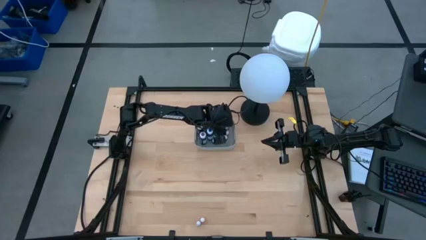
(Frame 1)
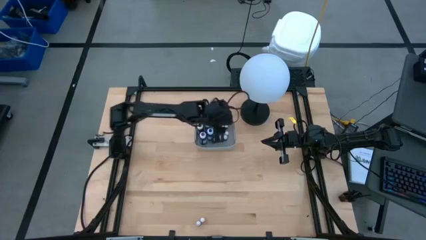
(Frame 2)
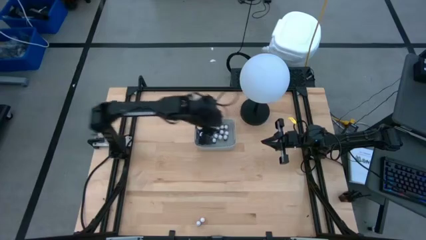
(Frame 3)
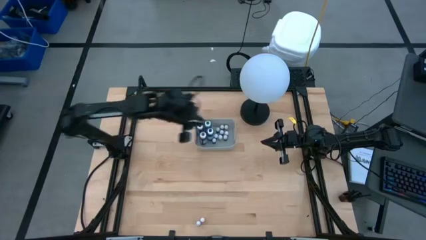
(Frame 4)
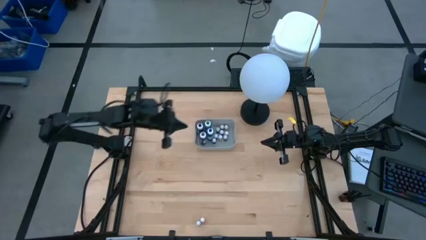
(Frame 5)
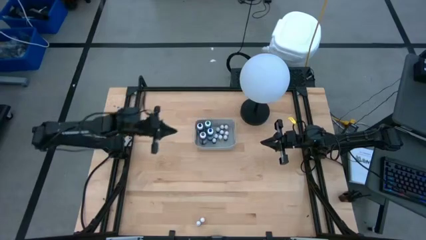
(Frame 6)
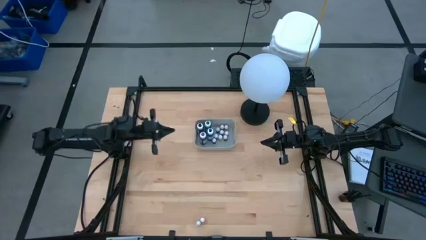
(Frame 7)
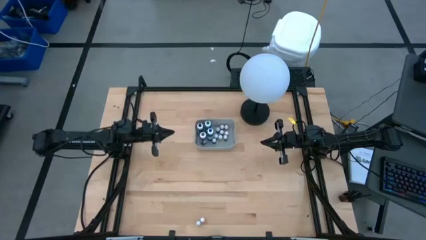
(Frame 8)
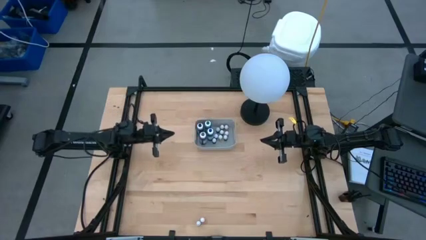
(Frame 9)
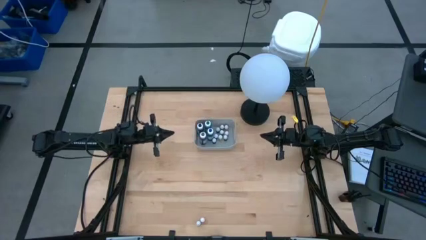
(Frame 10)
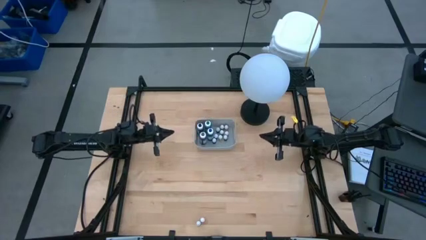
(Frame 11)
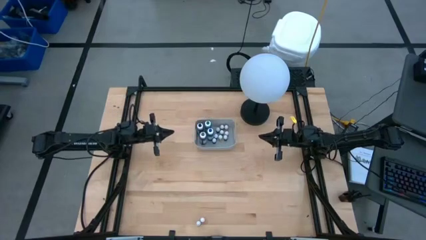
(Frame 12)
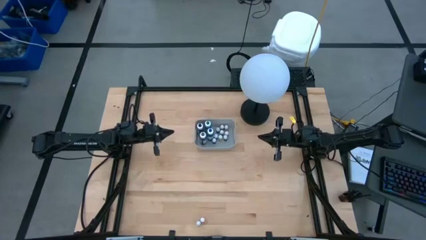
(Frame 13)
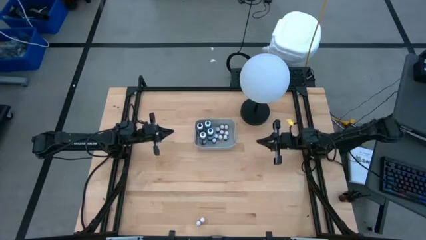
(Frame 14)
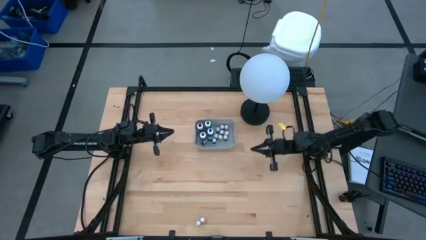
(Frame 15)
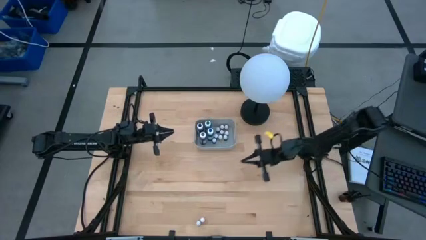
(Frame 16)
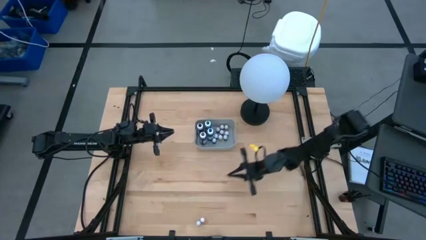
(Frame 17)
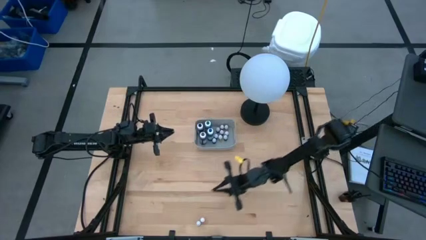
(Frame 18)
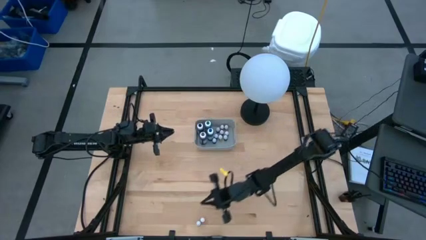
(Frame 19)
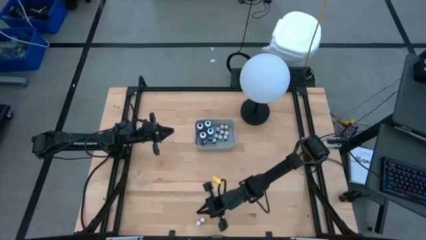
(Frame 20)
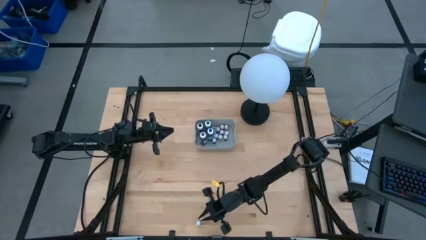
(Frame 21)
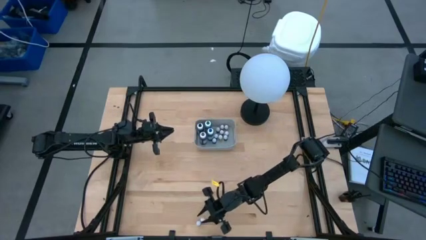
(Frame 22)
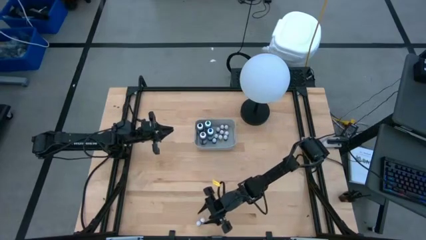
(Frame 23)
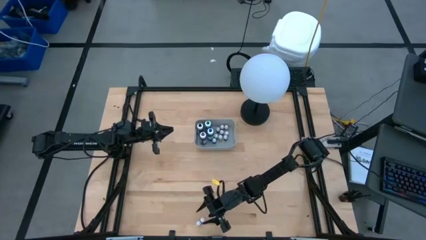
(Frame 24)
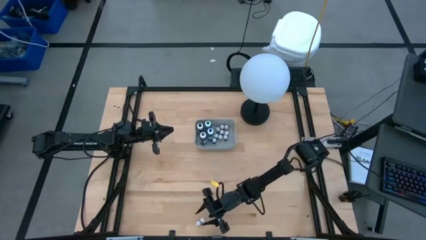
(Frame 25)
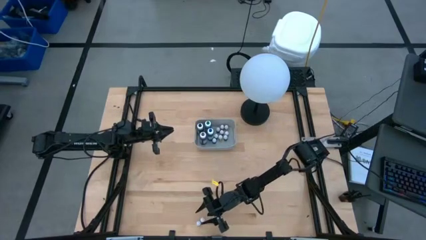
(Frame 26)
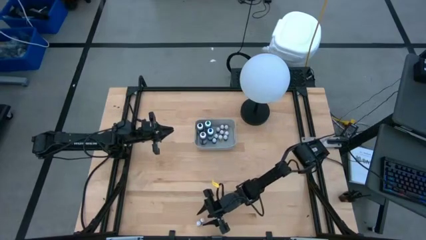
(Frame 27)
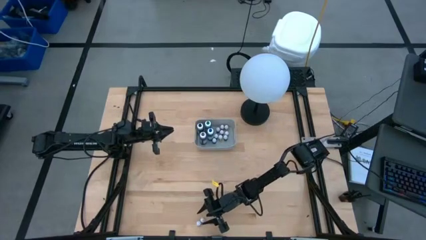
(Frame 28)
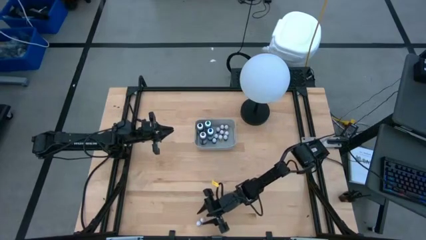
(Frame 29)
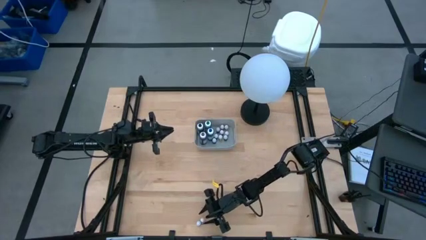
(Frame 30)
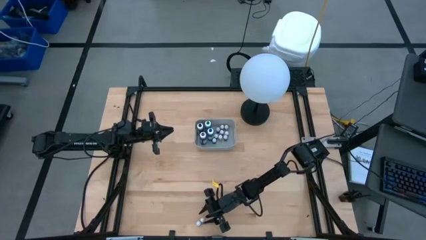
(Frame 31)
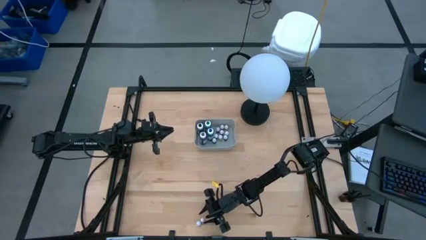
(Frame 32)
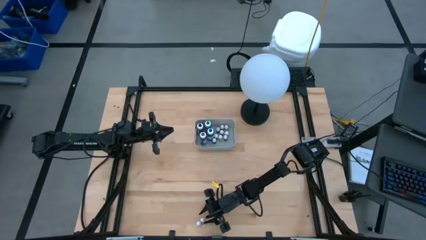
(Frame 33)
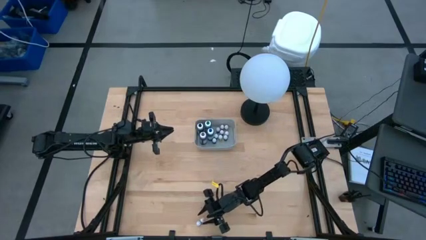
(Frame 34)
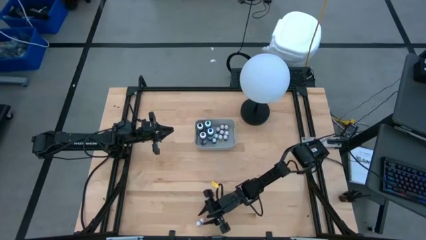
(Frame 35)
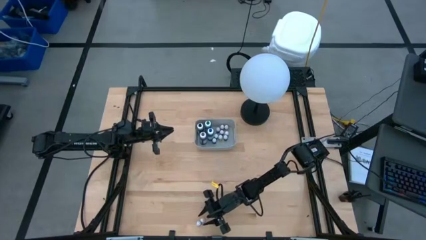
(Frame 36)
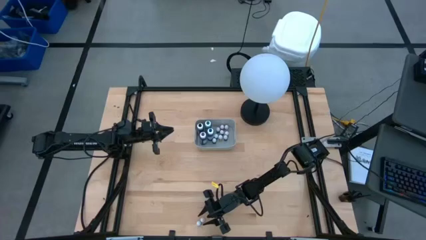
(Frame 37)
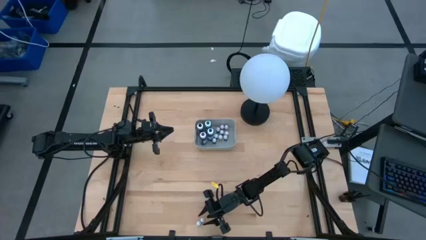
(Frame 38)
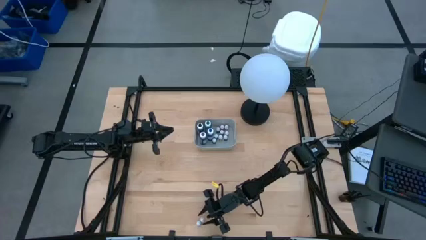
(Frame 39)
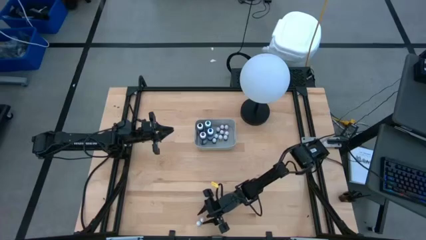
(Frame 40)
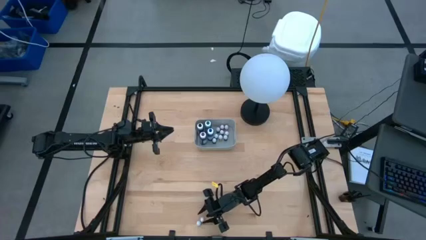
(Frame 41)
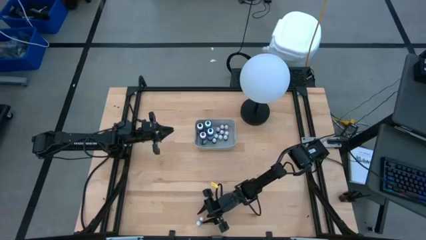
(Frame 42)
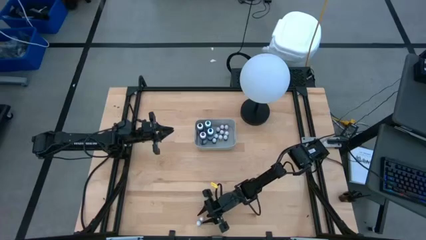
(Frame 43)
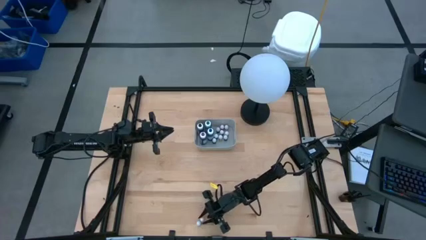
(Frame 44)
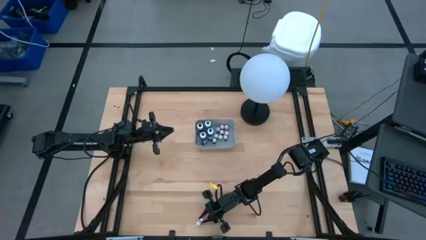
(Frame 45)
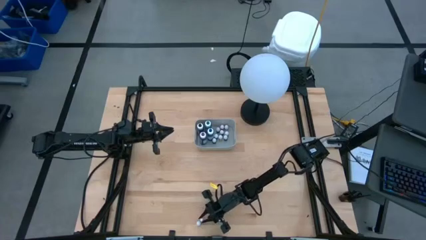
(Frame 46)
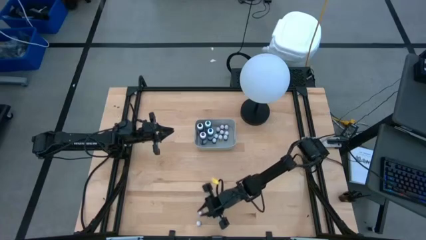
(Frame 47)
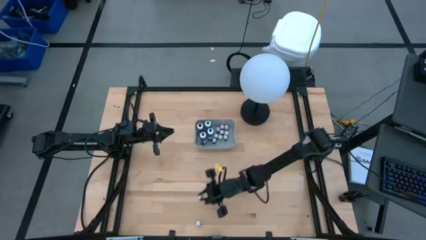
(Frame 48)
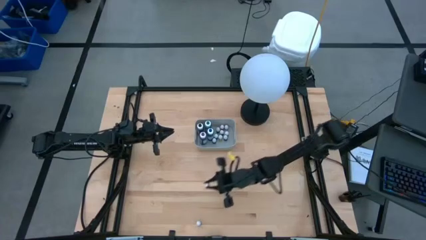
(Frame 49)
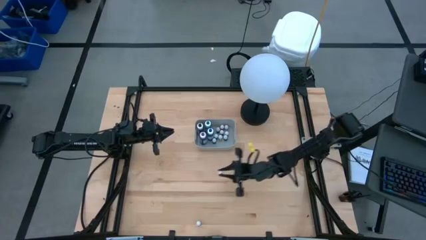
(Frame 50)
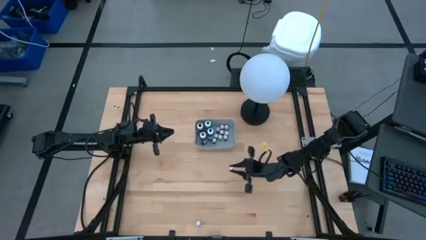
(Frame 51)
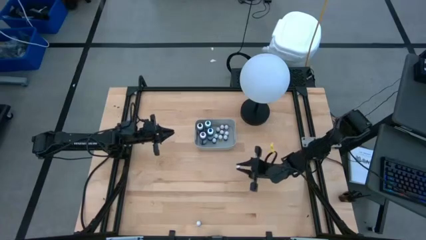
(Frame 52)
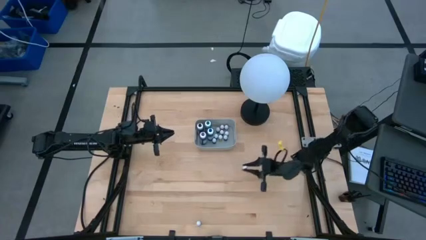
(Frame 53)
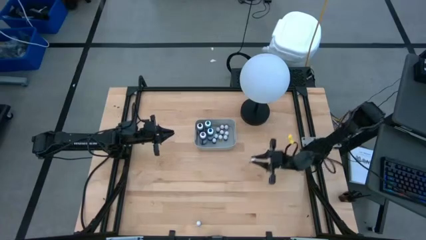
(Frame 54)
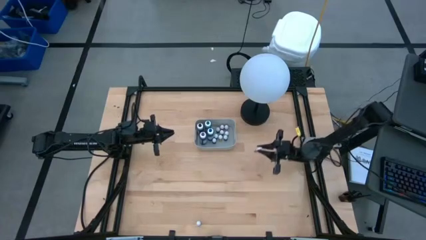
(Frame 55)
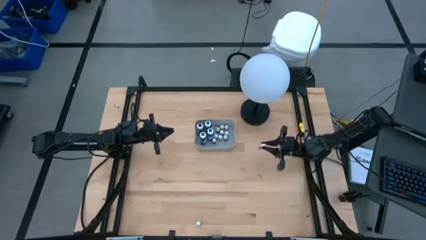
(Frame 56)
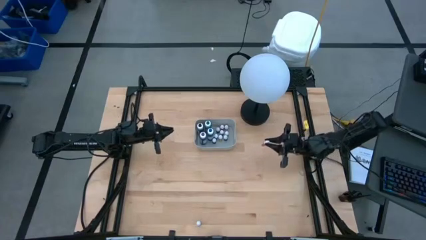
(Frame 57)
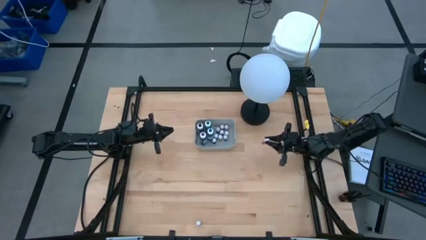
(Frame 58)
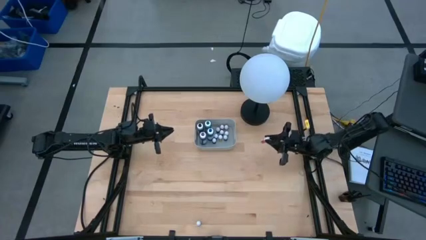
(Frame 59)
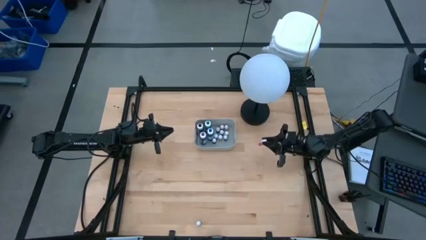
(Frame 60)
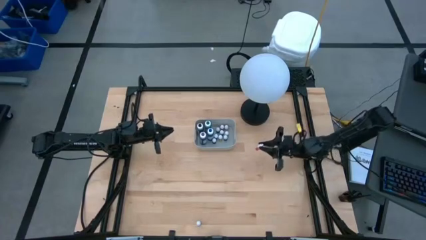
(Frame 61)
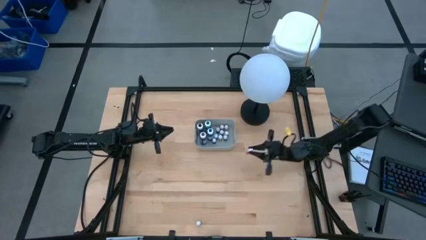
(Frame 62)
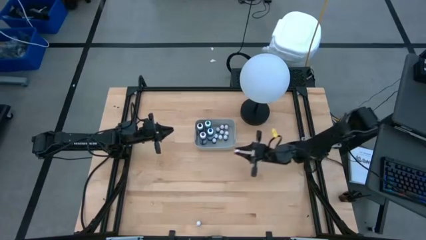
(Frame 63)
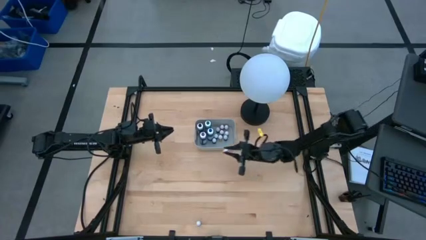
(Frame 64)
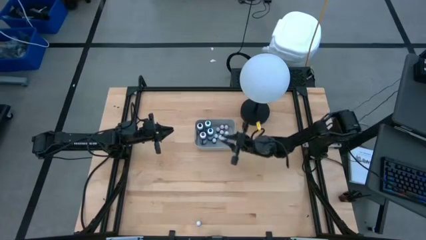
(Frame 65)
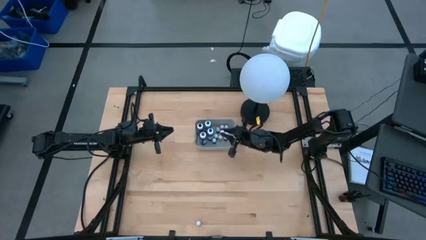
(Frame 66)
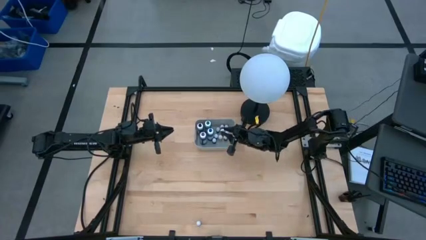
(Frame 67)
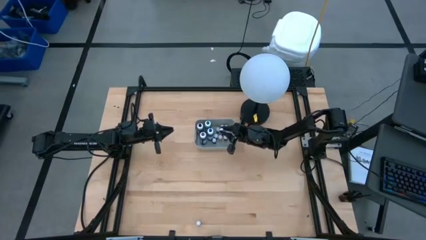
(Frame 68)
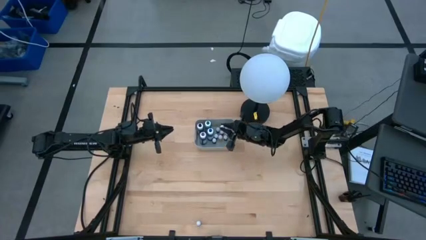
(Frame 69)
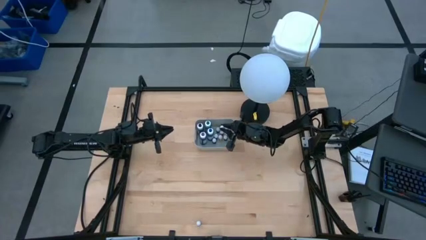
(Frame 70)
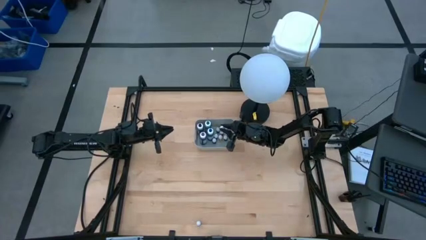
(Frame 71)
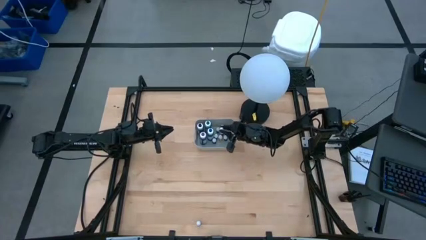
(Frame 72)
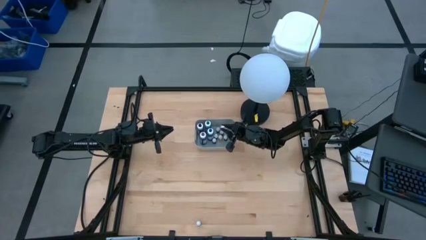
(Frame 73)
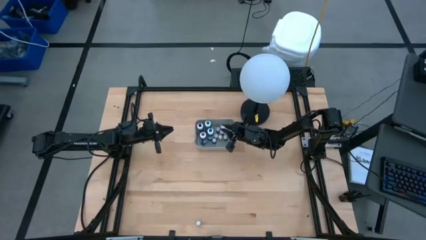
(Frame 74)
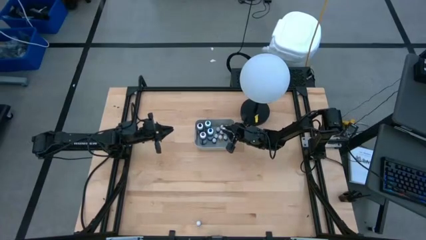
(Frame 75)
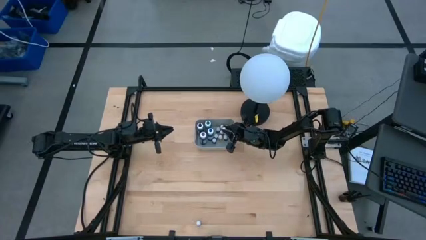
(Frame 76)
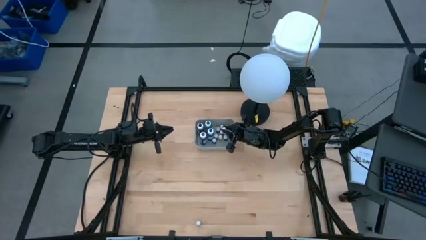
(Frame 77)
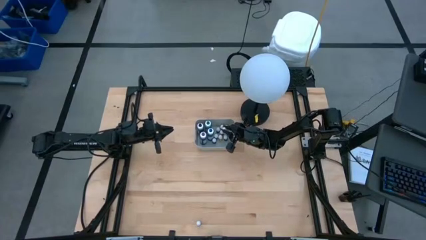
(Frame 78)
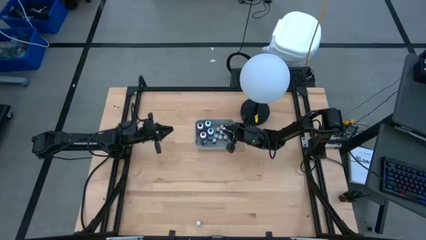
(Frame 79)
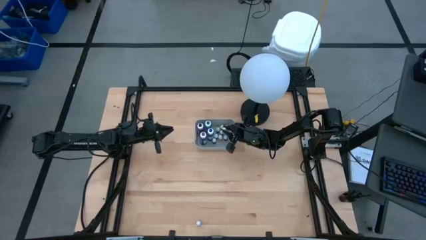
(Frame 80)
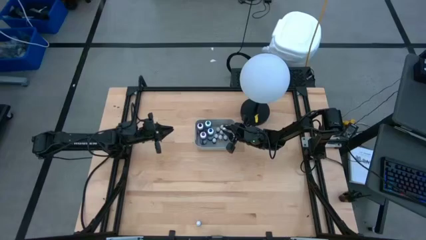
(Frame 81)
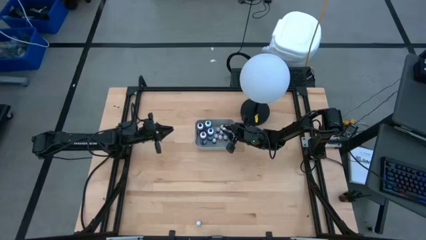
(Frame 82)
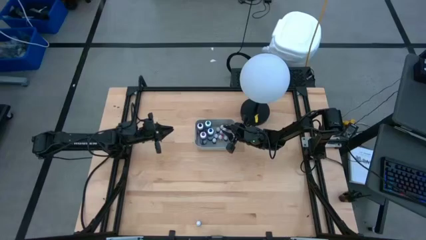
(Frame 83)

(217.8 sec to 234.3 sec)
Task: Pick & Place food coloring
Put the small yellow food coloring bottle into the gray bin
